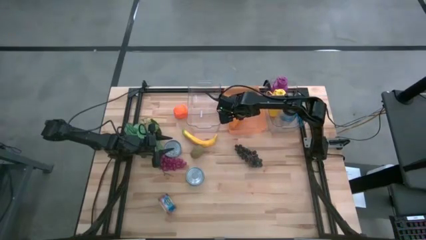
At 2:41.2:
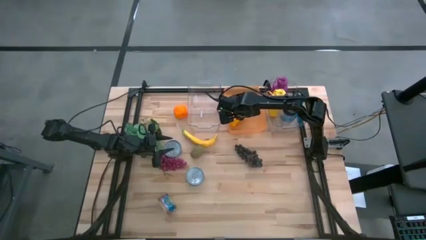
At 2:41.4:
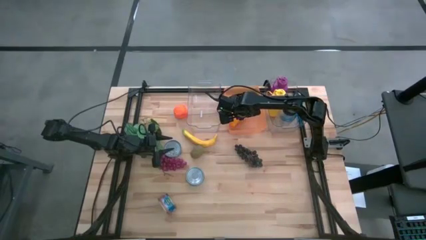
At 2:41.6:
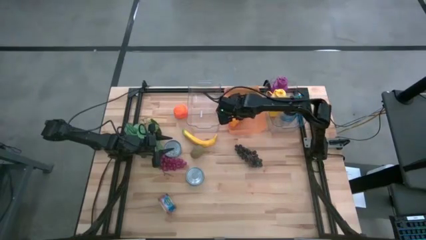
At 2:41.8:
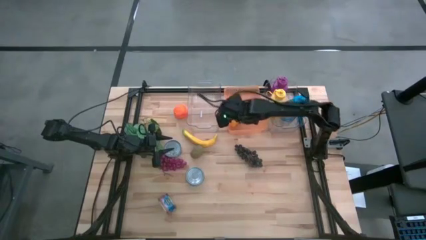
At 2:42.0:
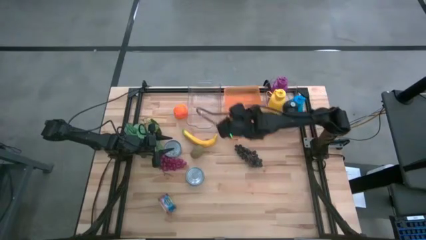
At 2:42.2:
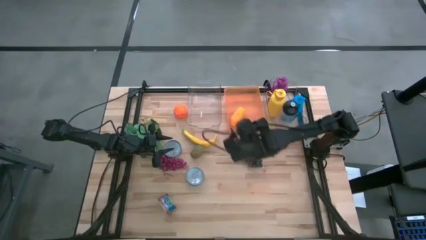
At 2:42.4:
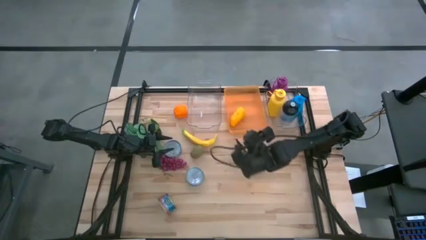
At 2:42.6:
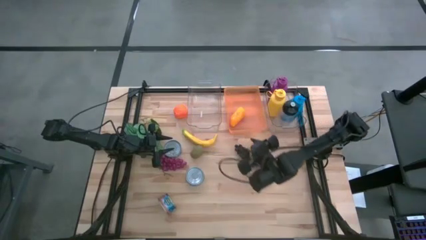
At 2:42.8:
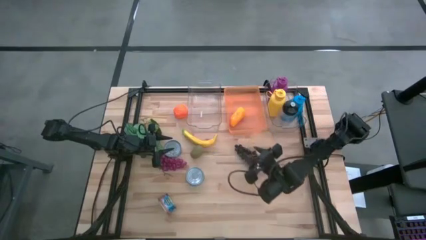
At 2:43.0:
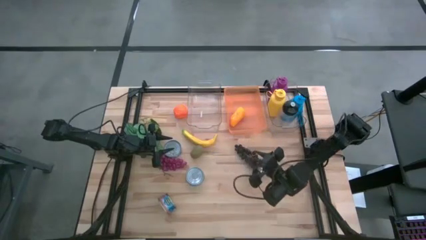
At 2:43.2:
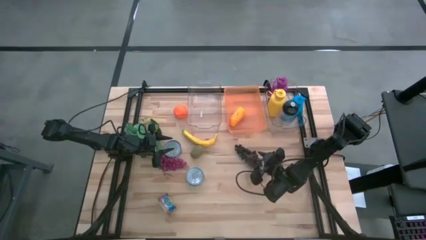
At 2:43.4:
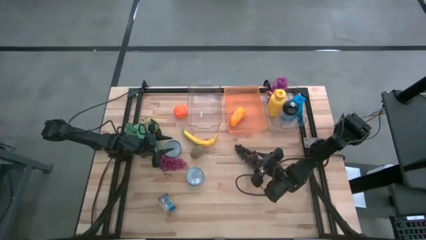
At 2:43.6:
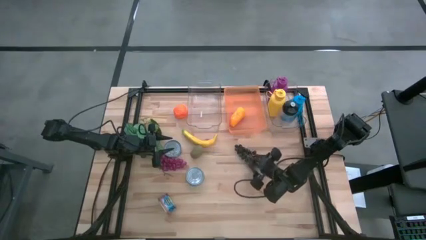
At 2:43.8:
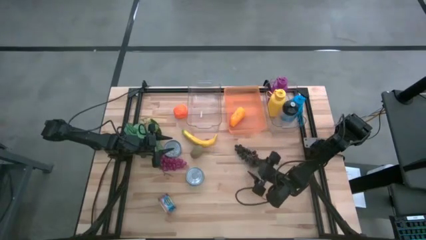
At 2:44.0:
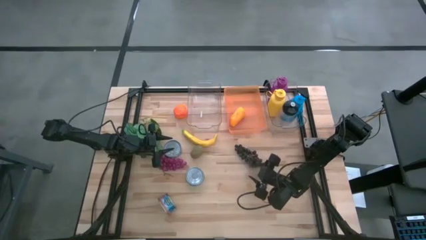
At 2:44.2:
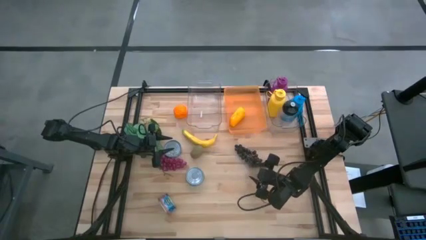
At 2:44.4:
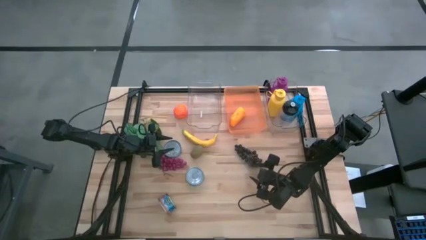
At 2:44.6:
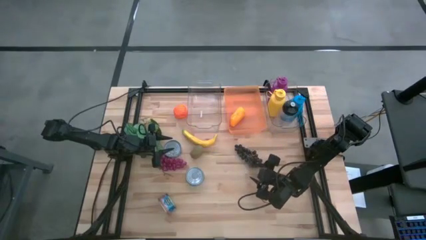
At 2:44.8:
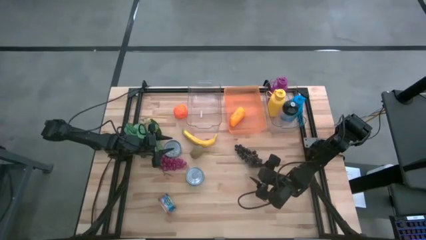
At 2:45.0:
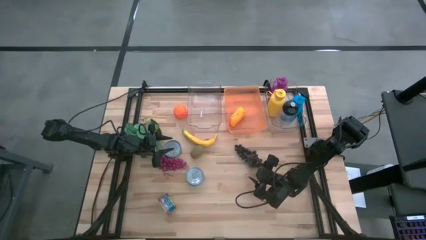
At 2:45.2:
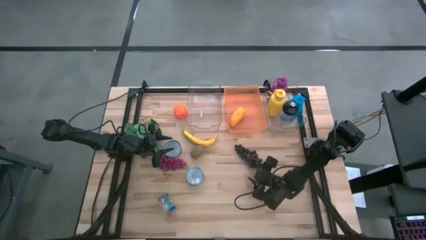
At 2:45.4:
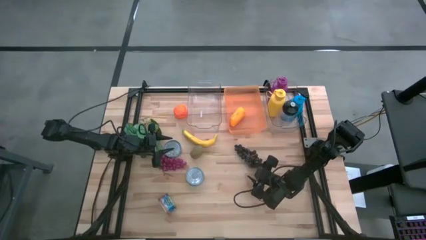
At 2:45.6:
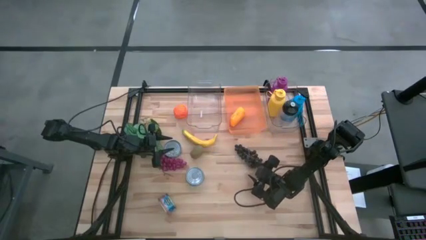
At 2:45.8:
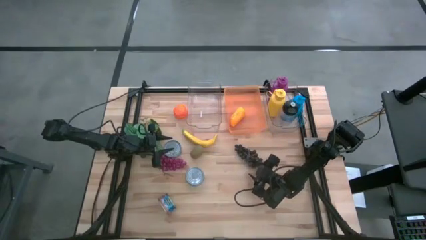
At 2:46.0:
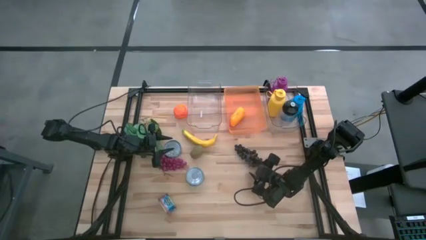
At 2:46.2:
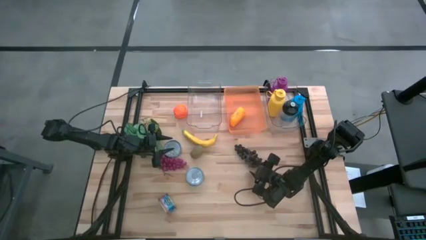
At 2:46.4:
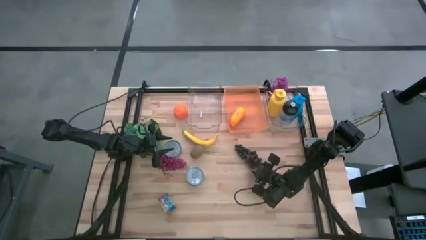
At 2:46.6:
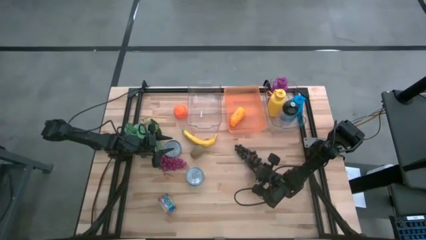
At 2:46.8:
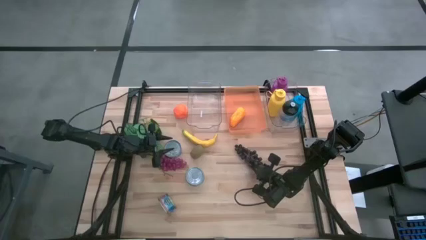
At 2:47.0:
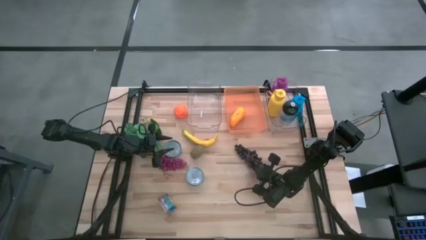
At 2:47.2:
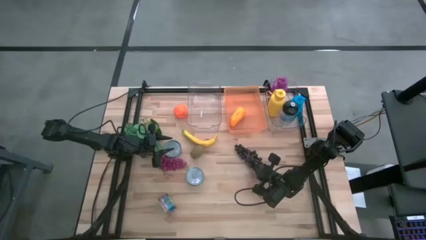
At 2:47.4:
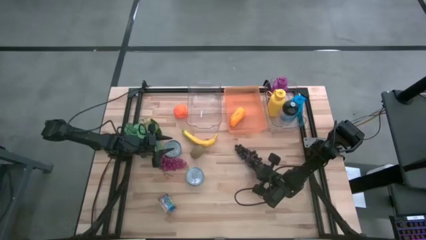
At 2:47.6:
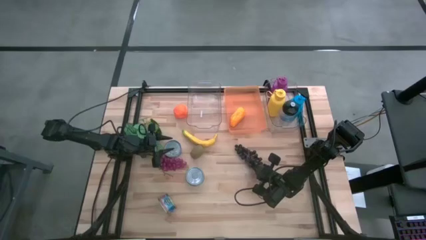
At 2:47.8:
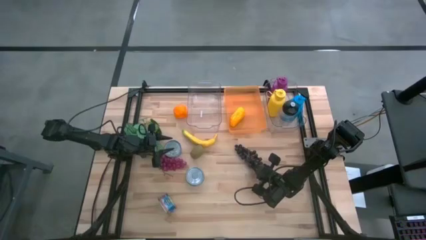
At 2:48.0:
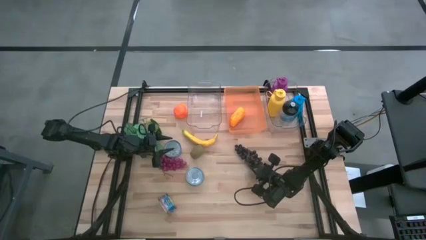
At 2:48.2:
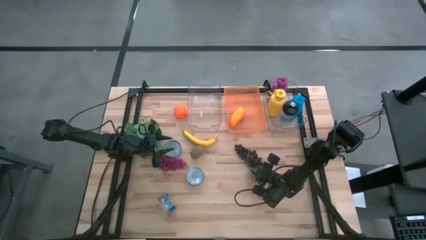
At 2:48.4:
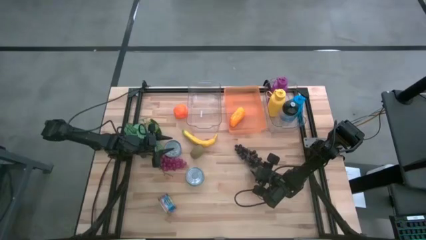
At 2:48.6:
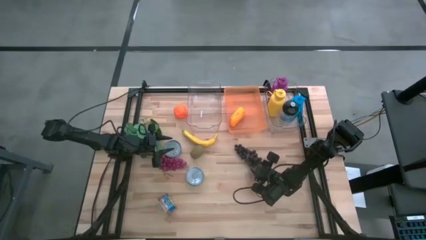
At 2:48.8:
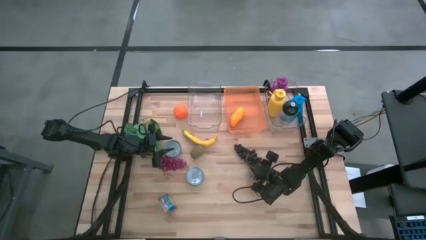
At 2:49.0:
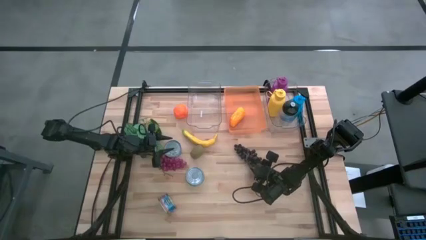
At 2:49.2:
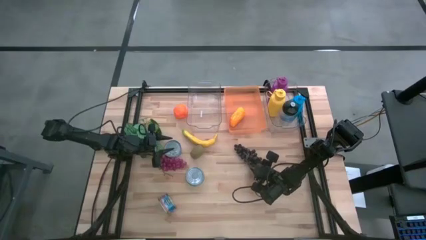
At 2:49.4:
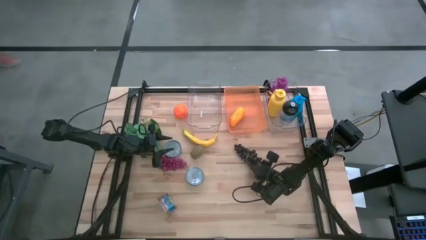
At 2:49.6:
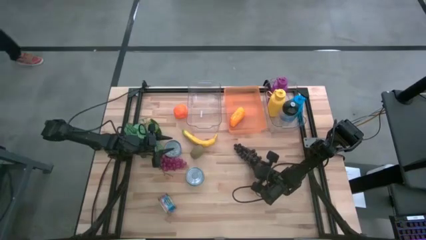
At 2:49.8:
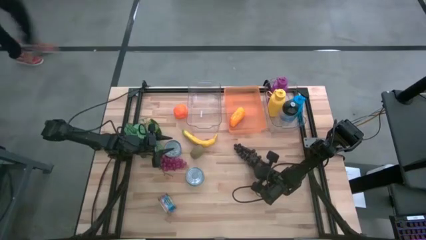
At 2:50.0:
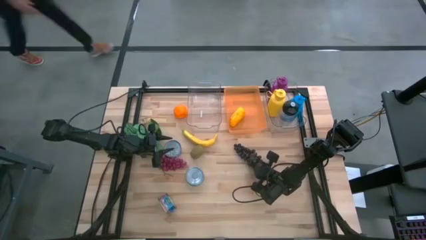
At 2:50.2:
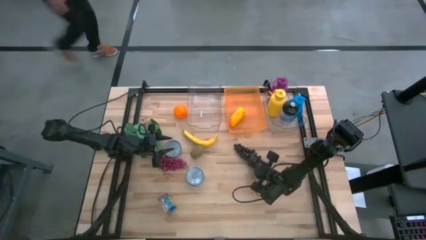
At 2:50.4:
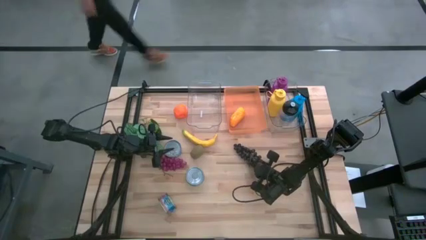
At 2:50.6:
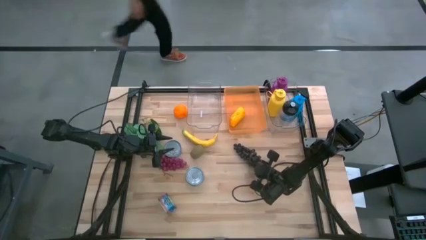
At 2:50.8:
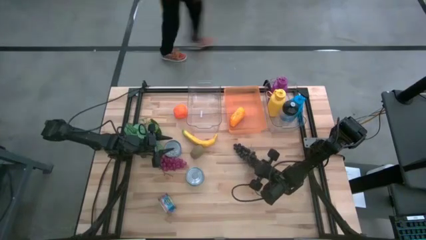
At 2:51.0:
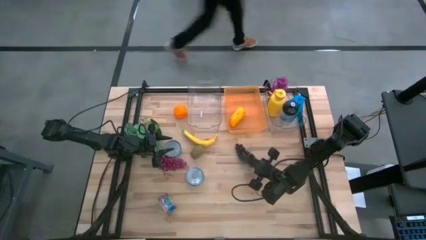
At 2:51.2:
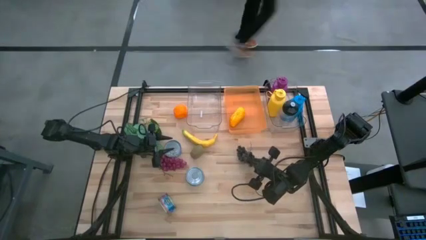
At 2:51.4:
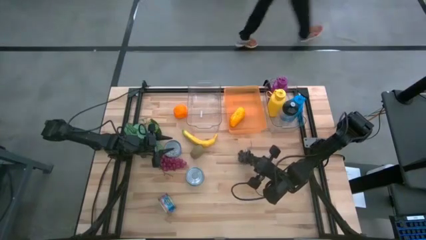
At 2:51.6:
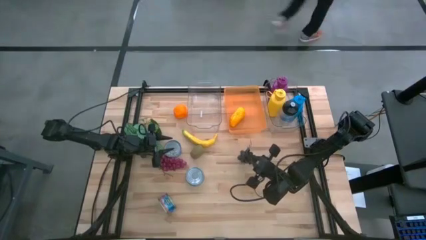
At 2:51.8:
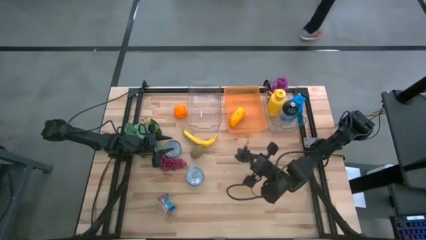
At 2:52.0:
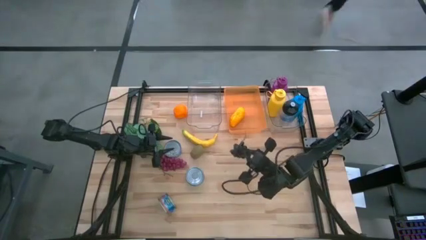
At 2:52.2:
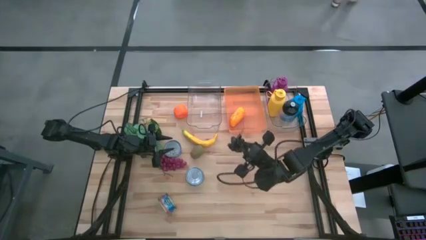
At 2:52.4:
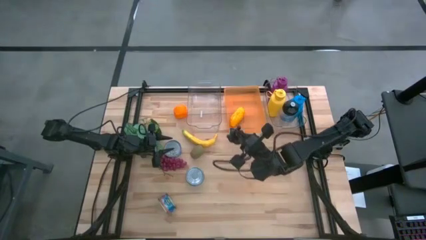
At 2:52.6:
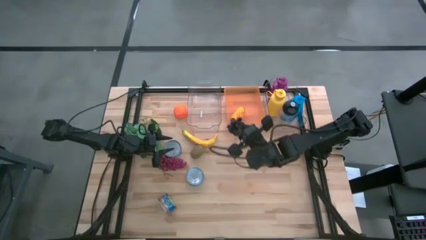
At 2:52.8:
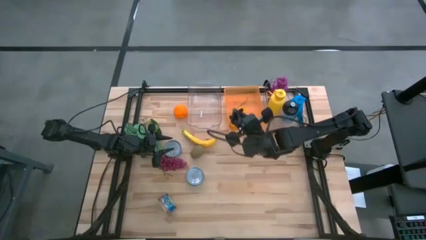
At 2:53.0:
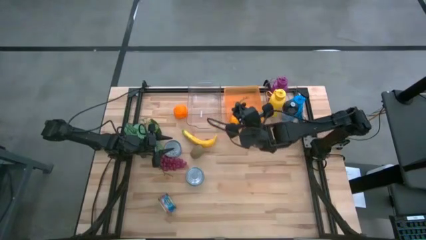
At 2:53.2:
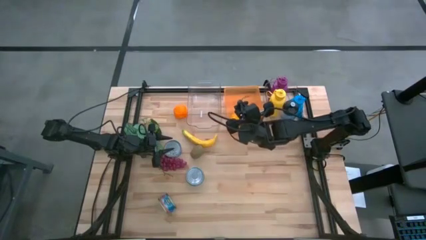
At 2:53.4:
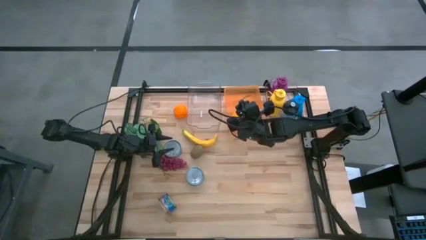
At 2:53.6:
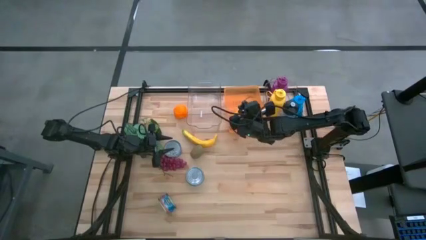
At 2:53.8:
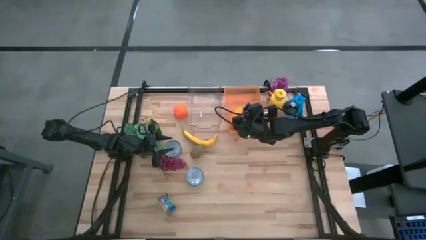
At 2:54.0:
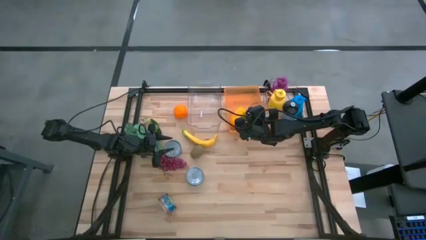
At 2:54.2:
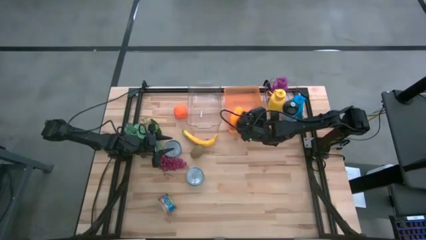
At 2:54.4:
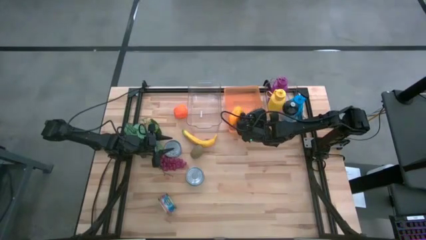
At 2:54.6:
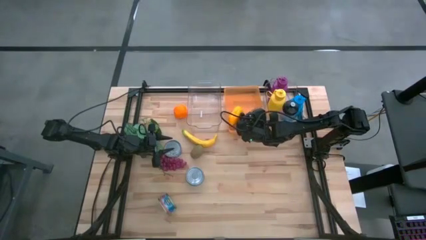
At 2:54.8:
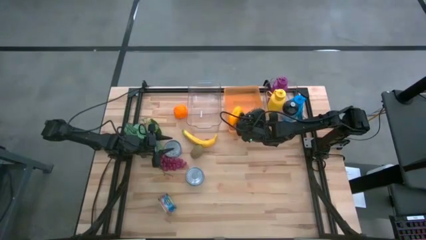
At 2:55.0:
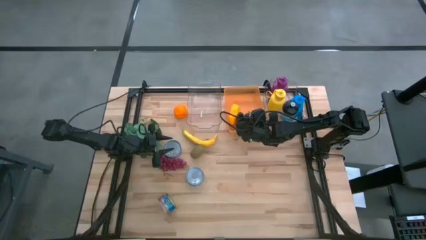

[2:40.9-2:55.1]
Task: Pick & Place Food Item
Put the black grapes into the orange bin

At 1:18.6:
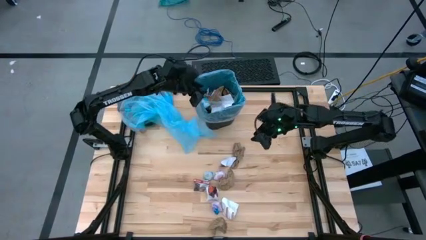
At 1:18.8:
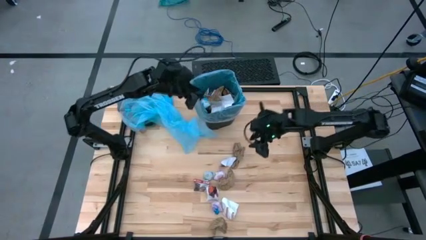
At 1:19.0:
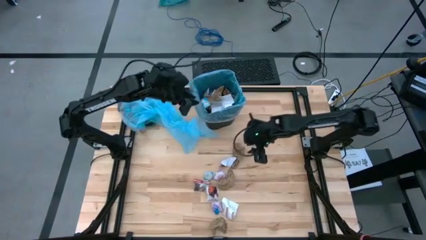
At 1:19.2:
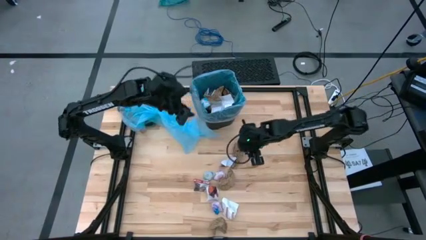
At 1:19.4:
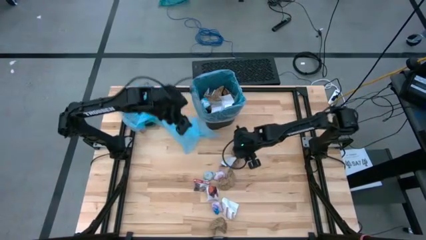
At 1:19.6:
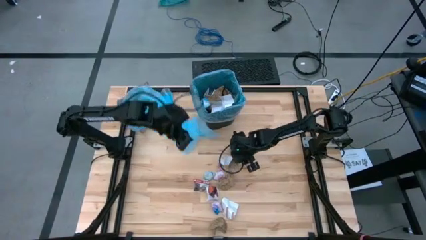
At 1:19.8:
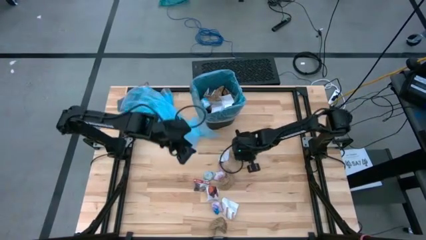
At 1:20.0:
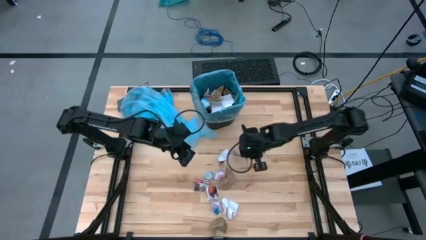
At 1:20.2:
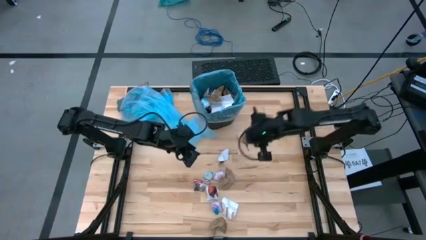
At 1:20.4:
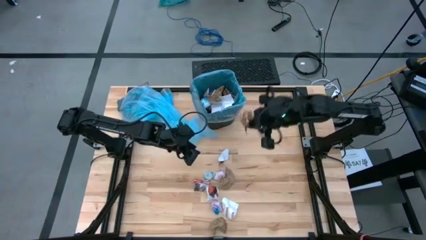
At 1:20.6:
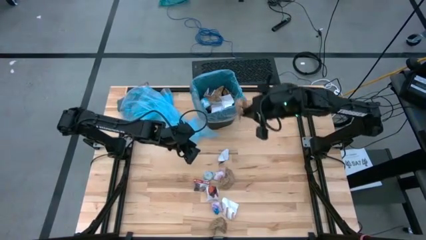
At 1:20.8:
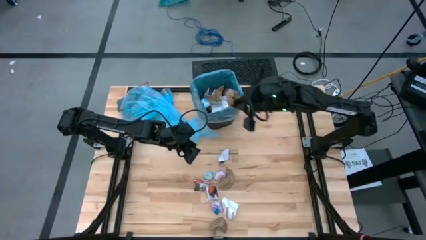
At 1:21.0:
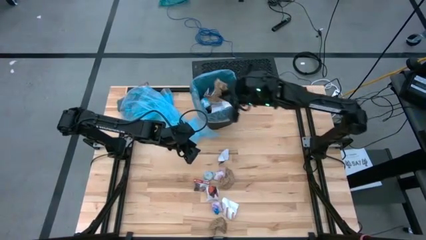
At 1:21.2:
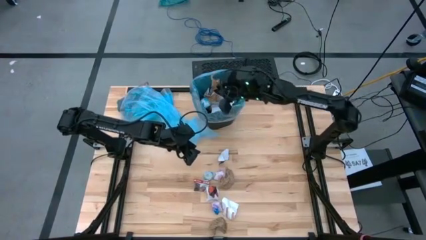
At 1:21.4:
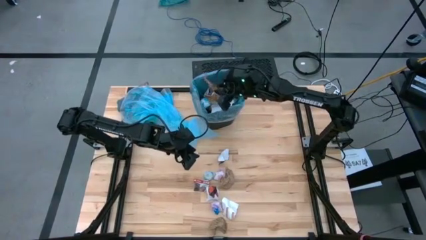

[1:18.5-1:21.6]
Task: place trash/remove bag and relplace
Put the brown paper into the trash bin

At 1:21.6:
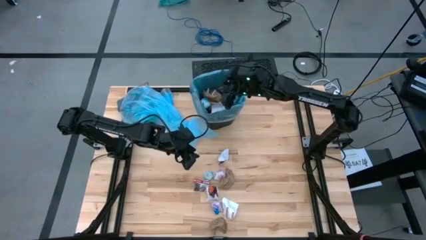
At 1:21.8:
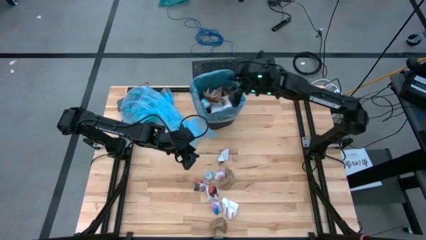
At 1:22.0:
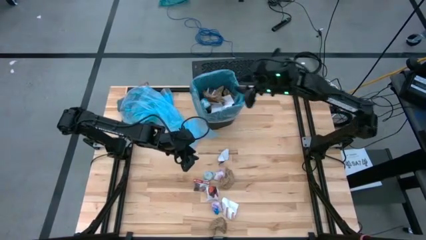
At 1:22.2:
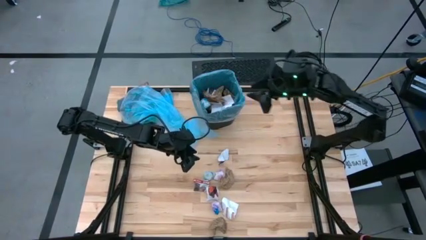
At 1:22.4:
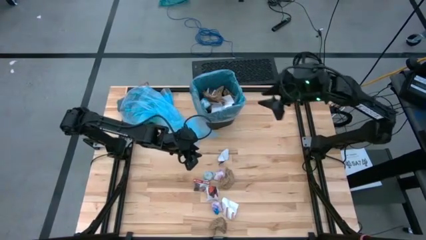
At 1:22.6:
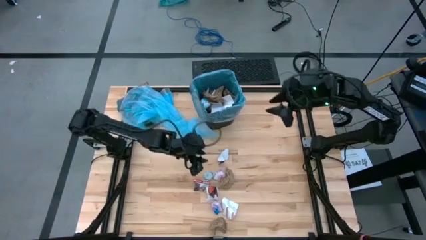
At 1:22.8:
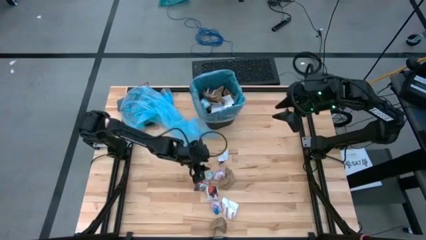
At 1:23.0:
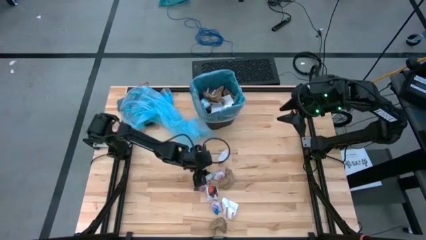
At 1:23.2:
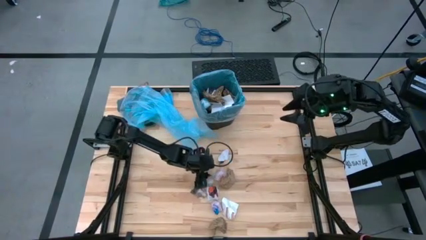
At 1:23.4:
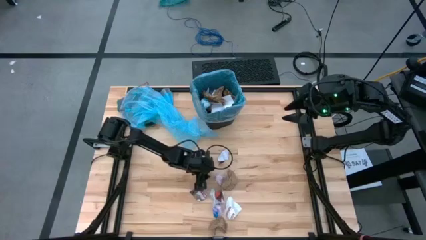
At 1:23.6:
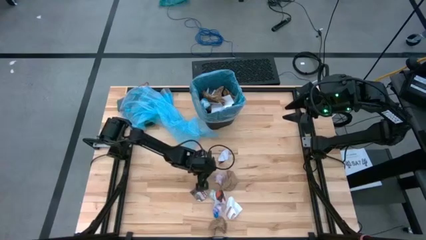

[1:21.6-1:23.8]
Put the blue crumpled plastic bag into the trash bin
